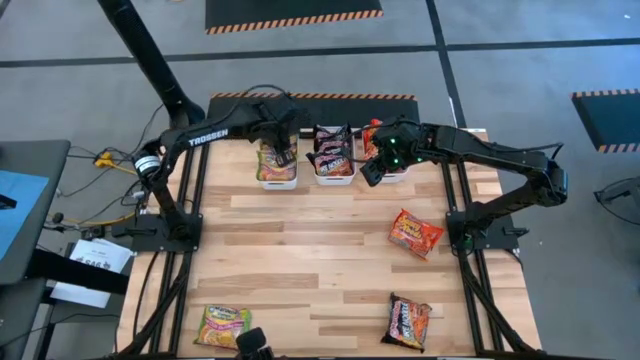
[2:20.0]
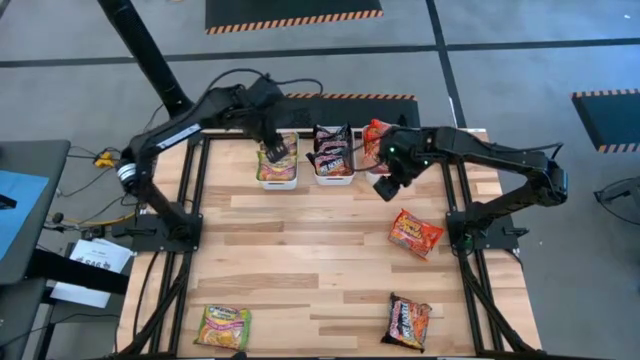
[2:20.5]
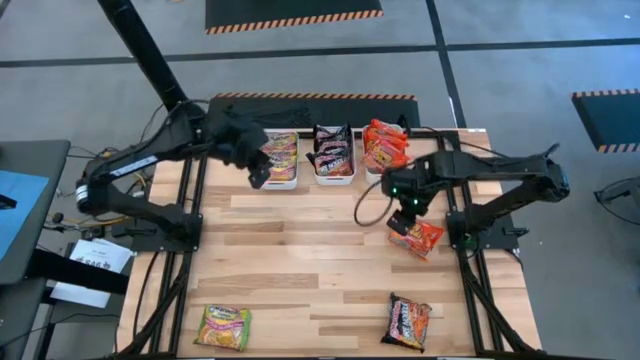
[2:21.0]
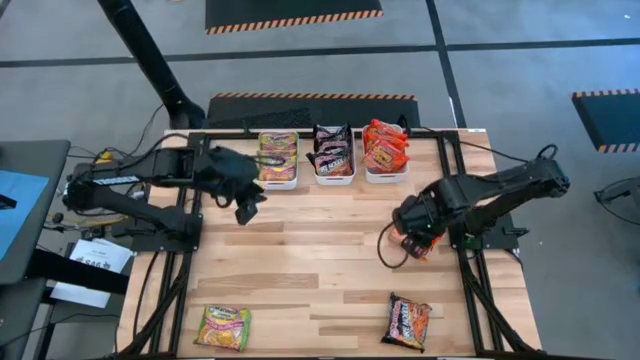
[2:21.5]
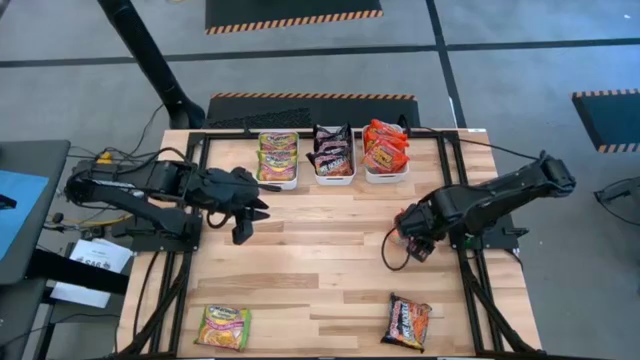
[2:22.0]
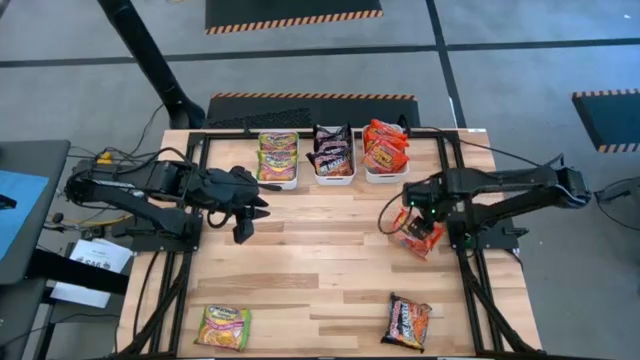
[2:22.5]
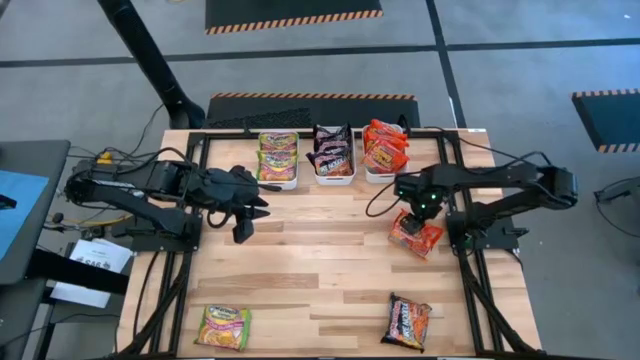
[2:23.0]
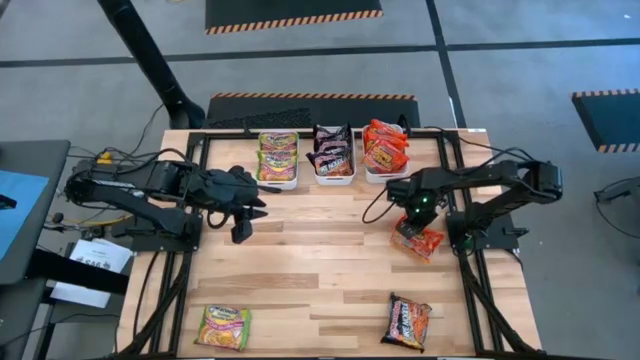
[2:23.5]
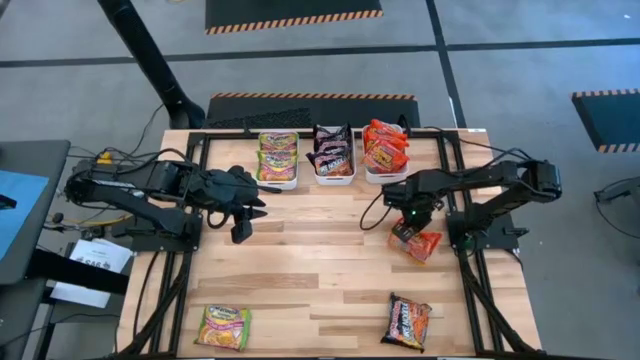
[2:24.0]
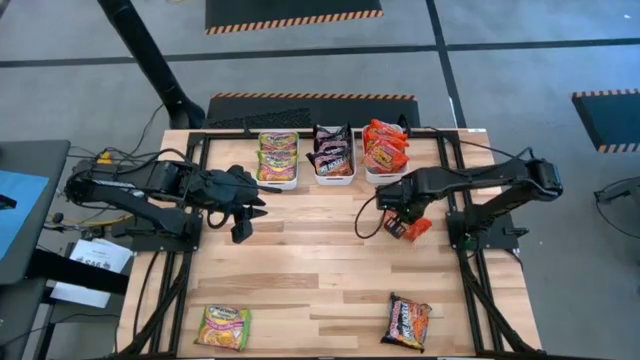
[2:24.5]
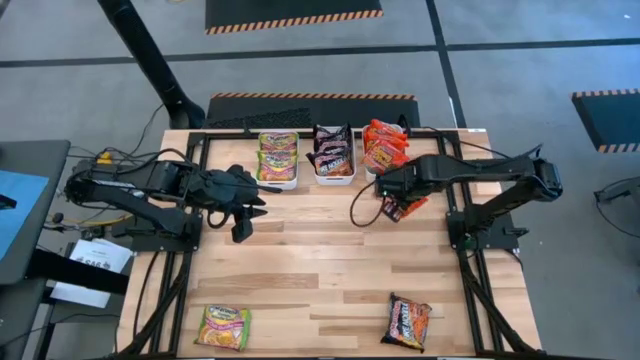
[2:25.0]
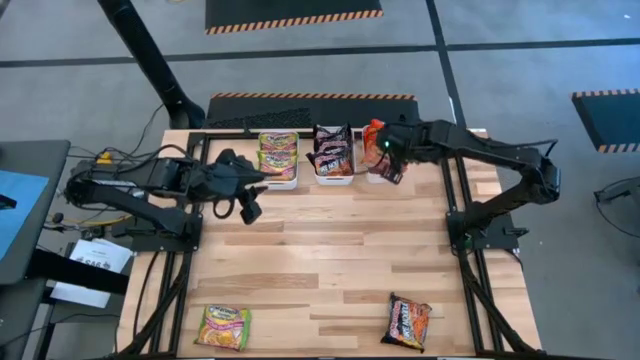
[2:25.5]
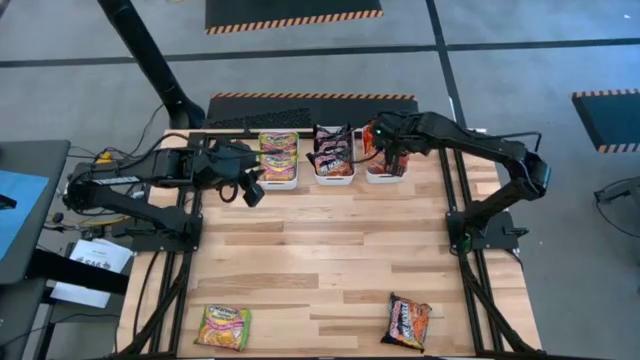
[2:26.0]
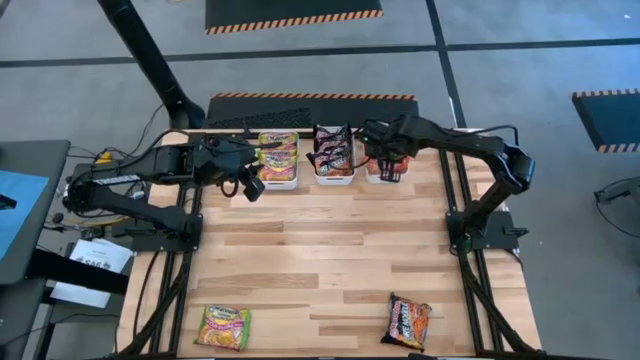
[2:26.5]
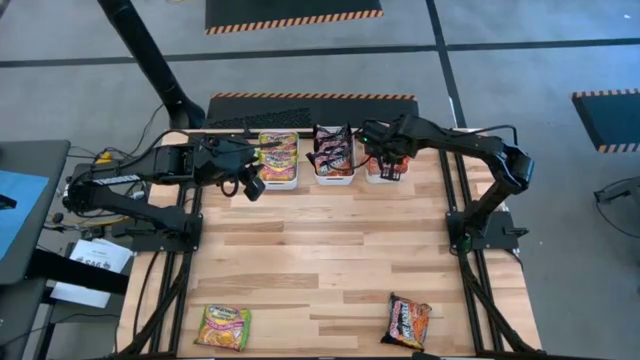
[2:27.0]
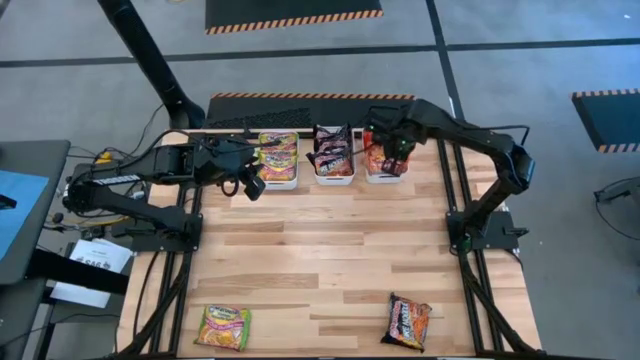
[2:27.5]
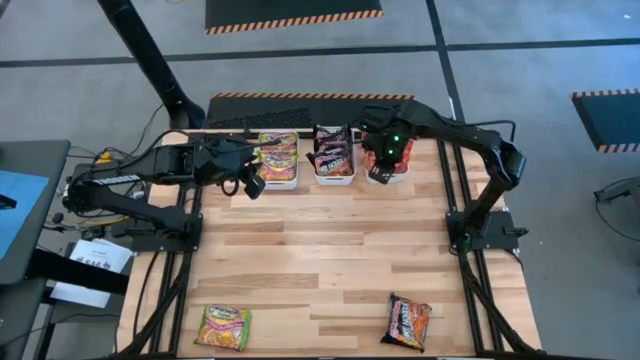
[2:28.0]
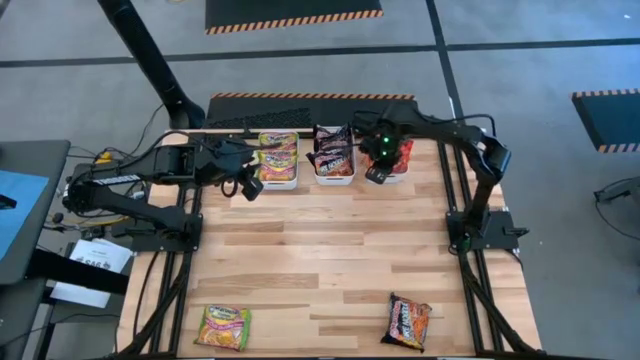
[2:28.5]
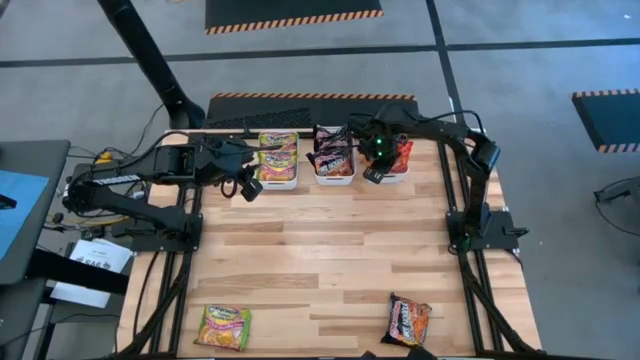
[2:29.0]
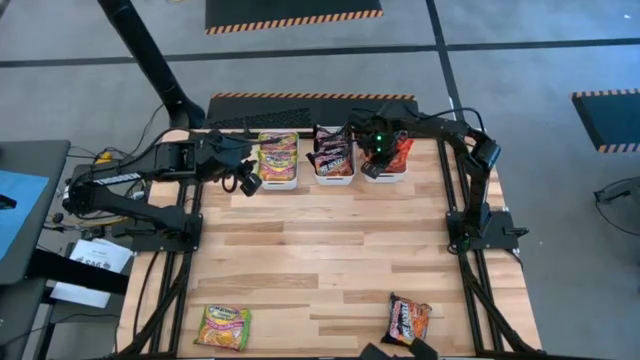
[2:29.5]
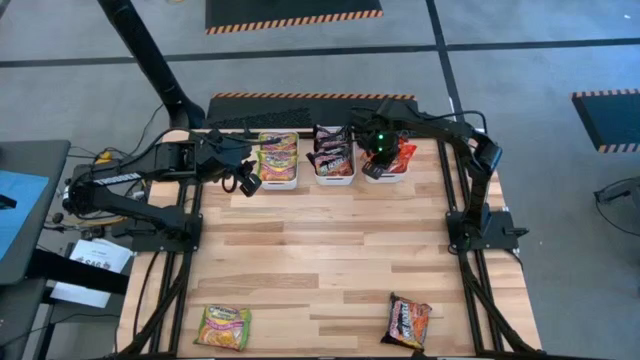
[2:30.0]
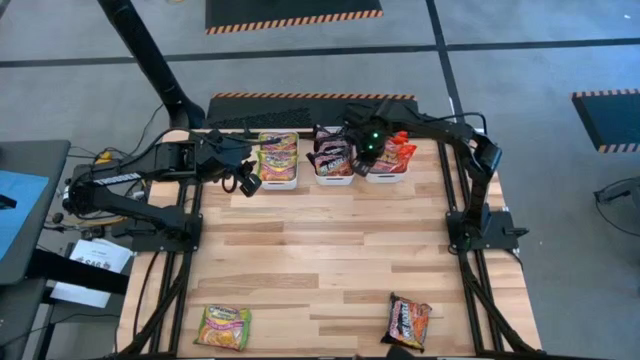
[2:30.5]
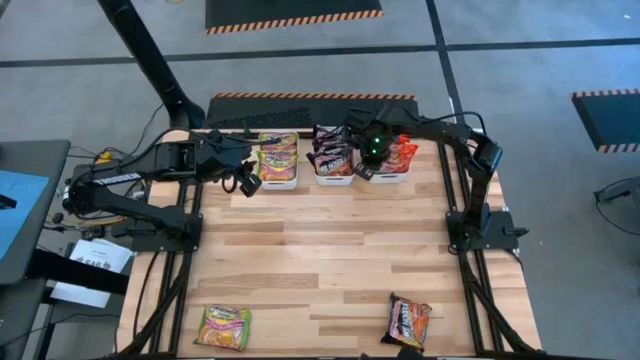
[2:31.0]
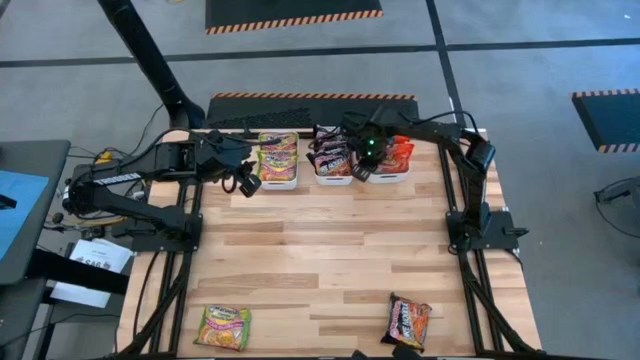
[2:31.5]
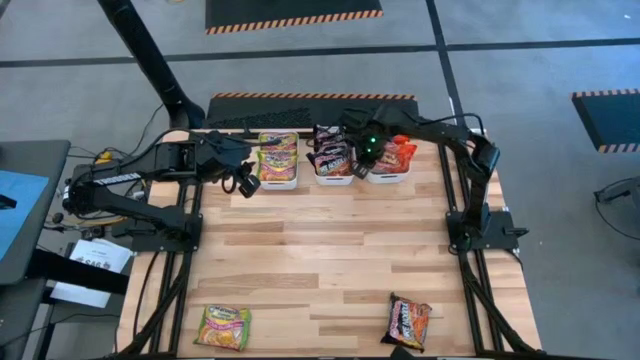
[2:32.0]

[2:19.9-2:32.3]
Task: Sort Maruchan noodles
Put the orange noodle pack into the right white bin

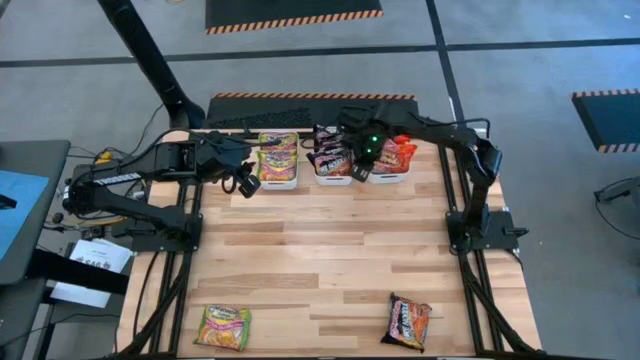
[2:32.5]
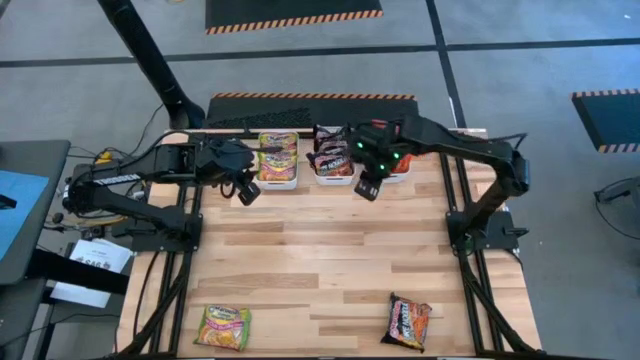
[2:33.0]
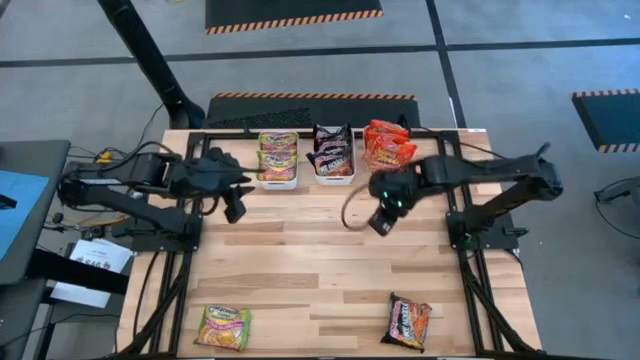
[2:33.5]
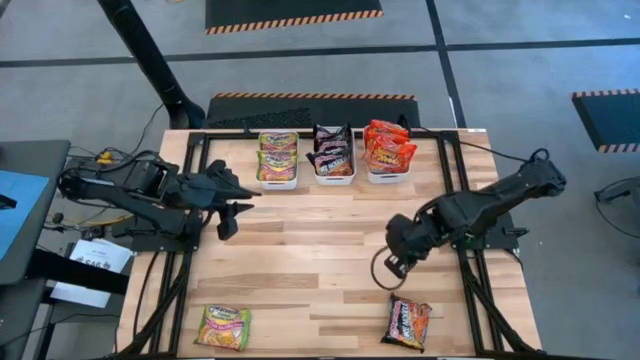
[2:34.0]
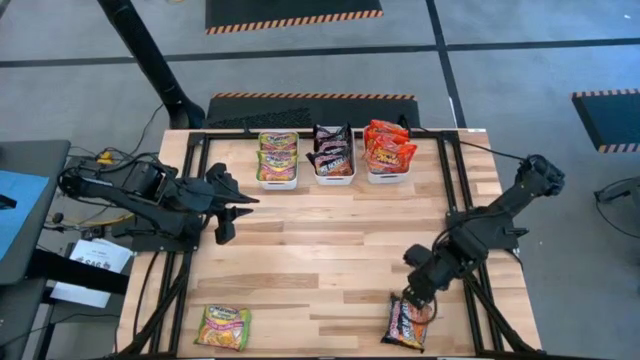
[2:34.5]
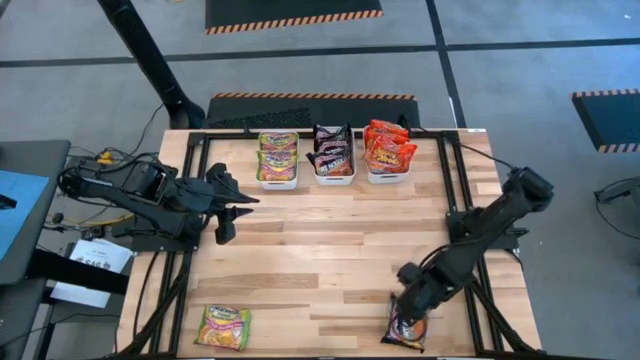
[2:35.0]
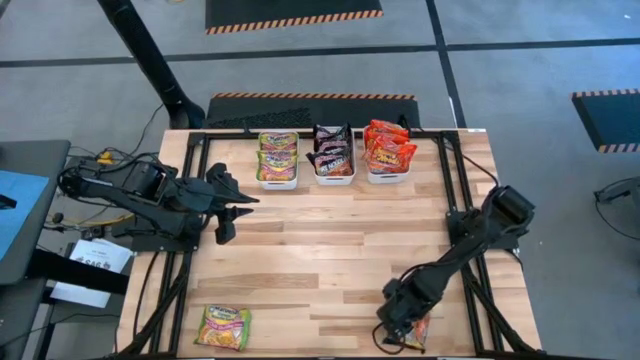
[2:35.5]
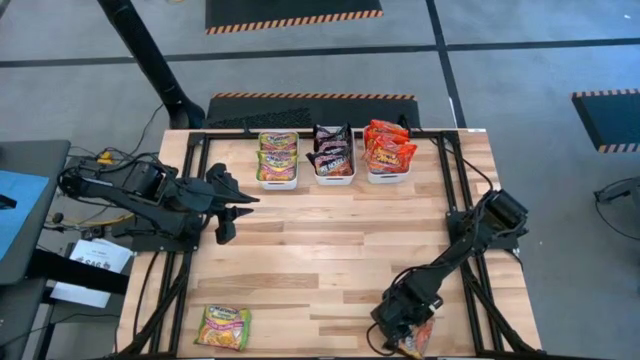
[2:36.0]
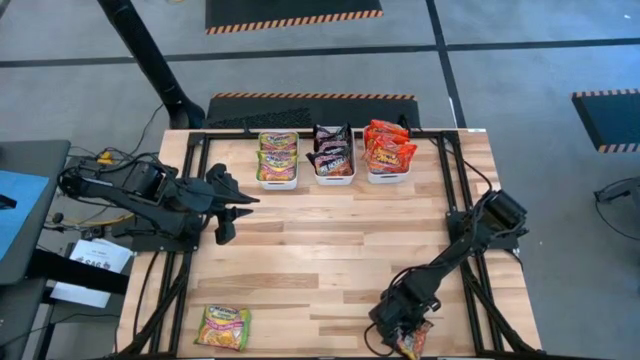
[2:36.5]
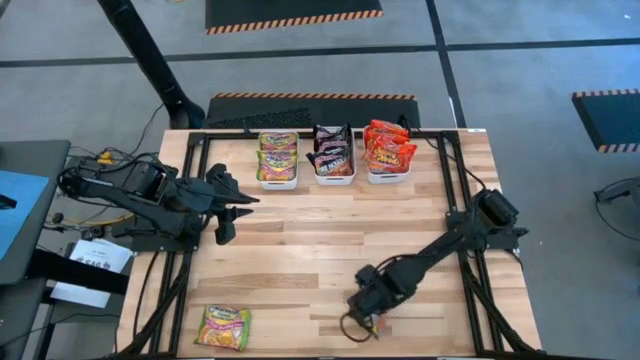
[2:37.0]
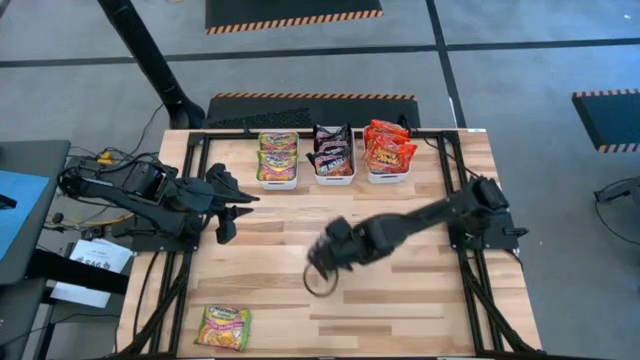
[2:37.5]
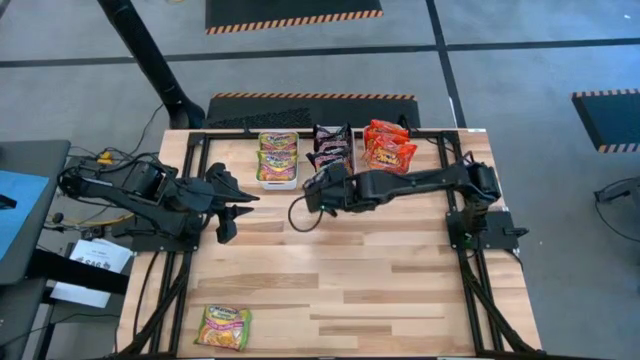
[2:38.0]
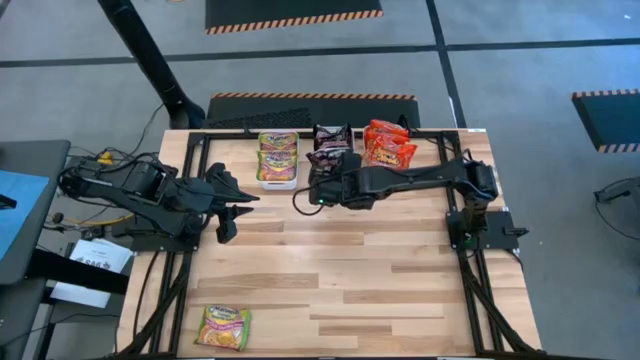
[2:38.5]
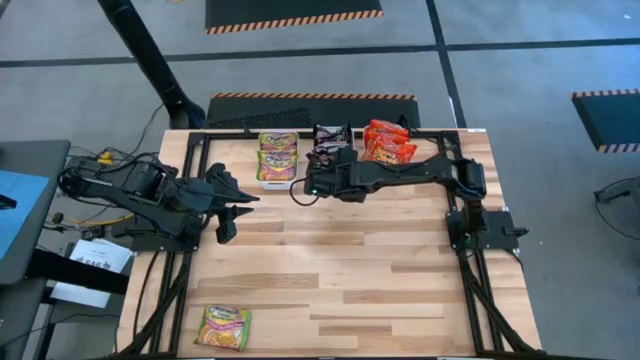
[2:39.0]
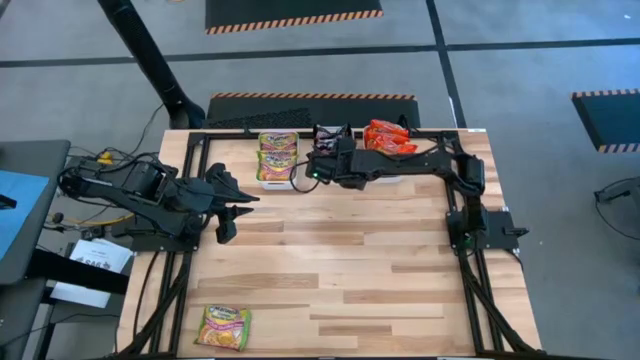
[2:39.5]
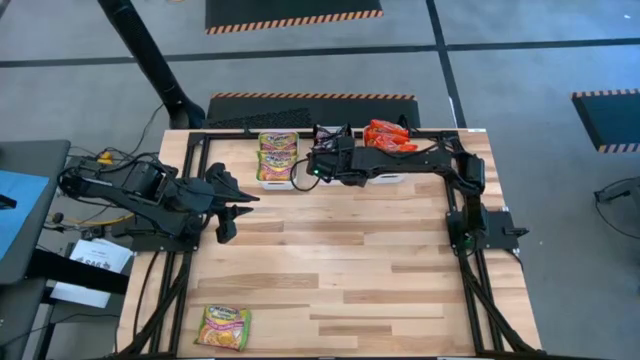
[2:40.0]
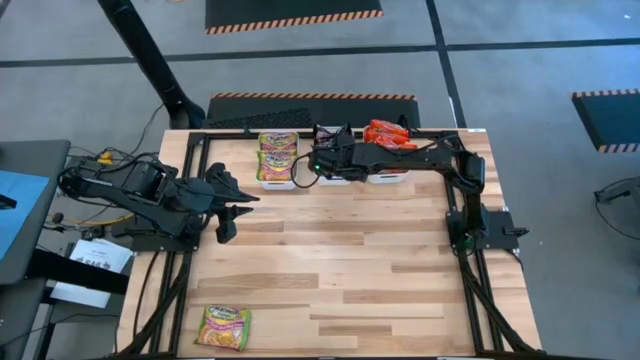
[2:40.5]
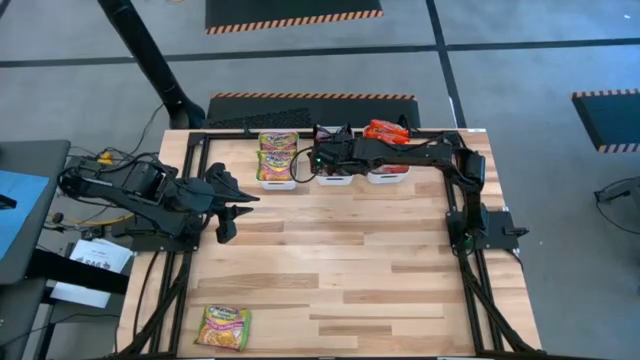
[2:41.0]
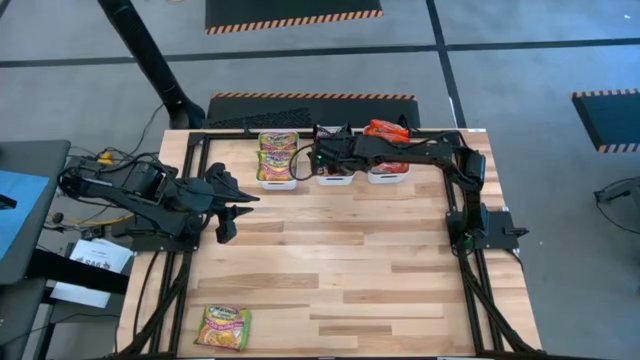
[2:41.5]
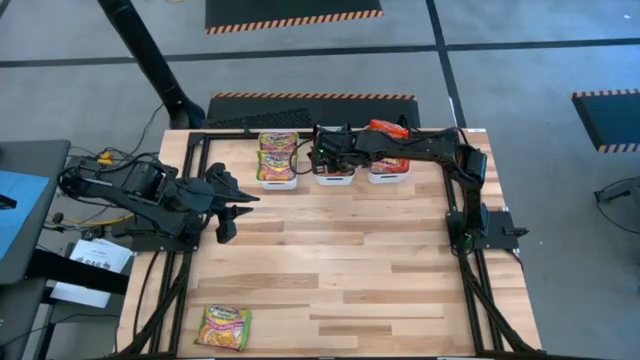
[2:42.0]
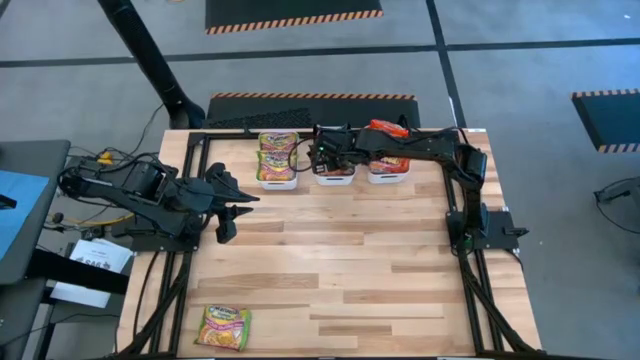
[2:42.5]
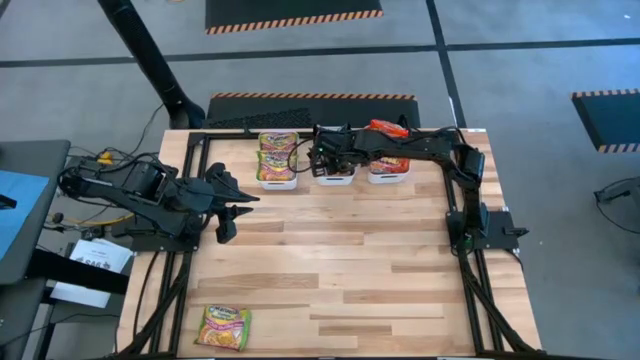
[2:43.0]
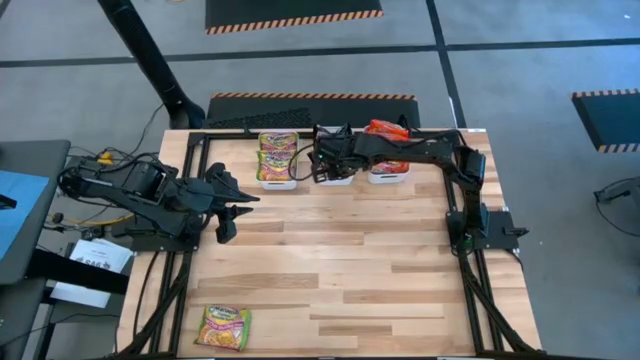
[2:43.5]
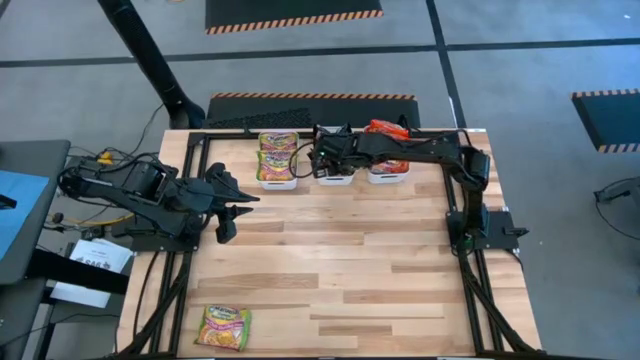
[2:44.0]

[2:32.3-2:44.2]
Put the black noodle pack into the middle white bin
